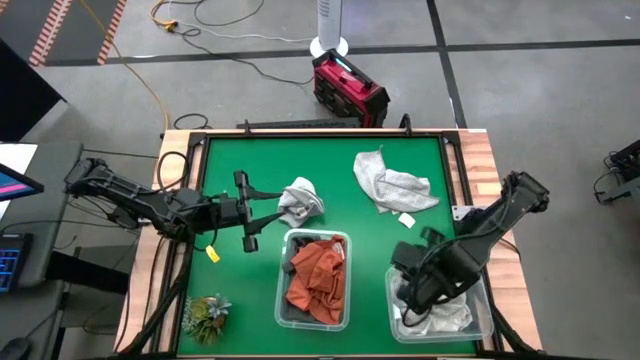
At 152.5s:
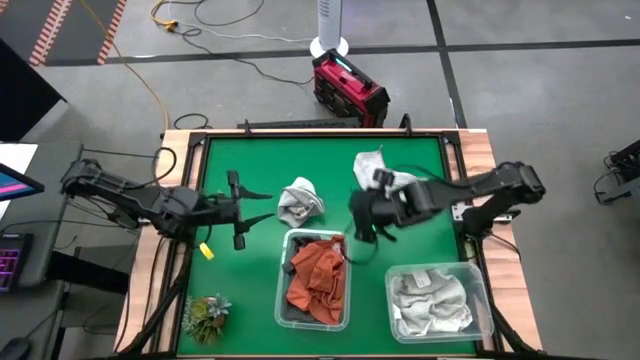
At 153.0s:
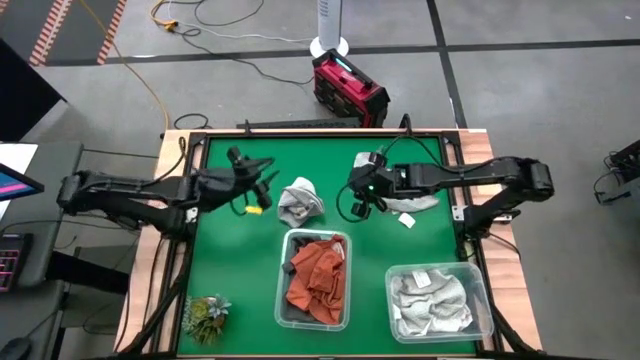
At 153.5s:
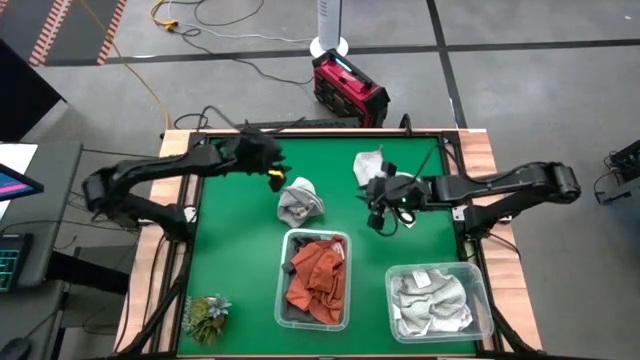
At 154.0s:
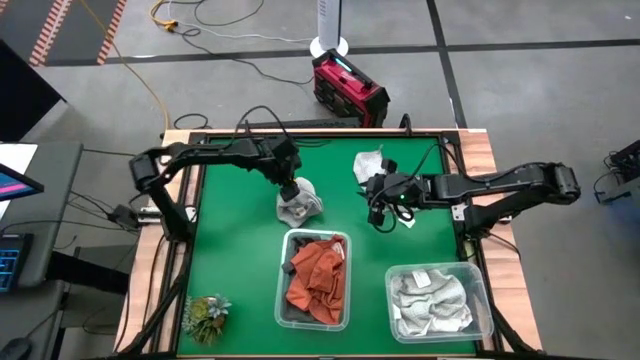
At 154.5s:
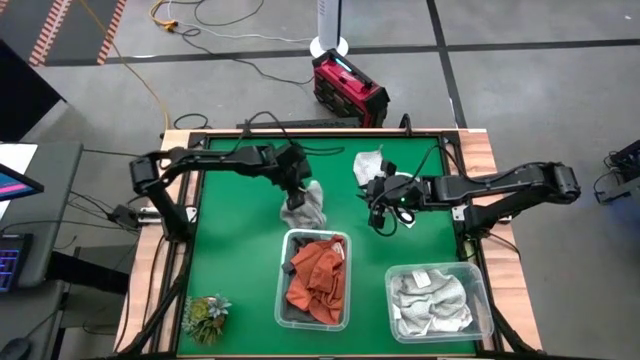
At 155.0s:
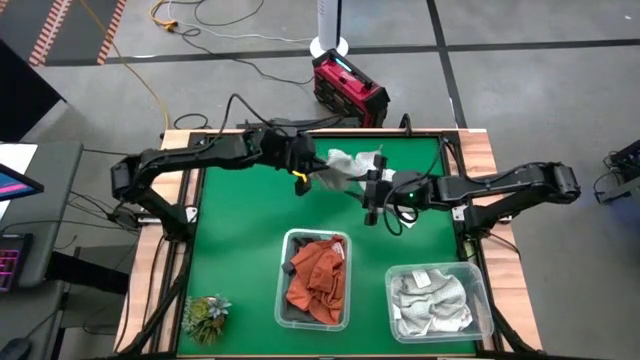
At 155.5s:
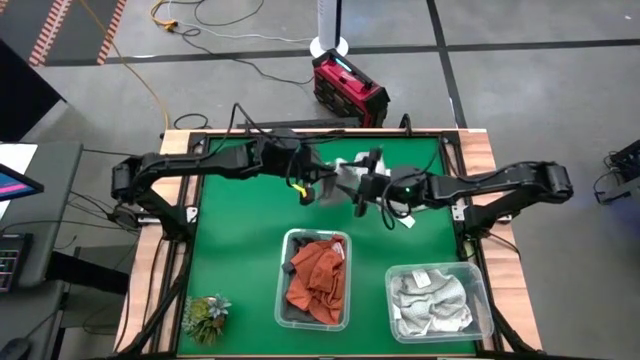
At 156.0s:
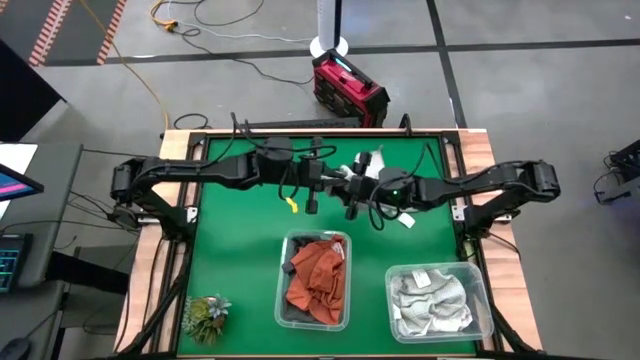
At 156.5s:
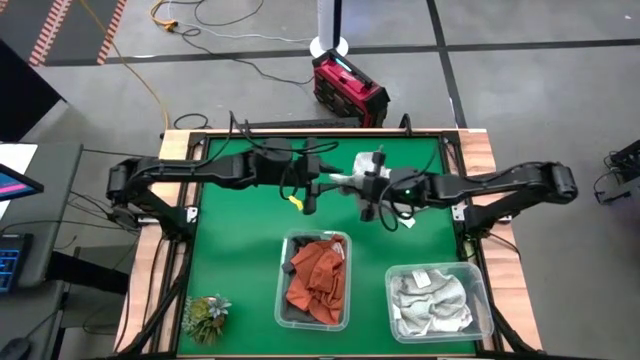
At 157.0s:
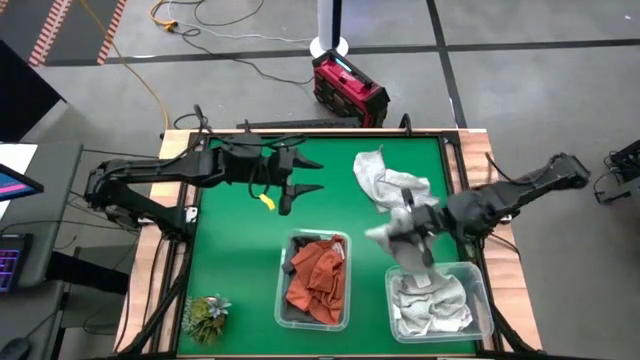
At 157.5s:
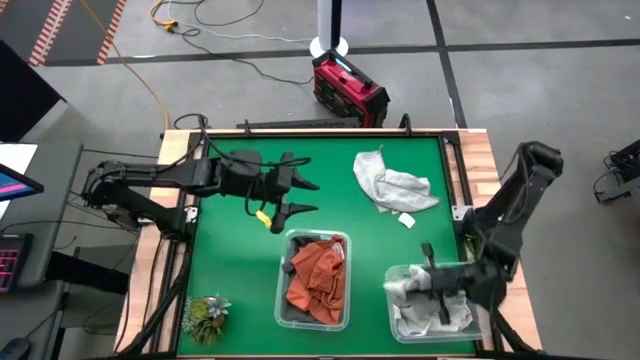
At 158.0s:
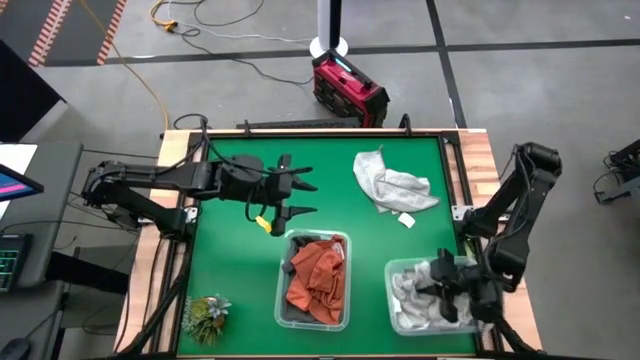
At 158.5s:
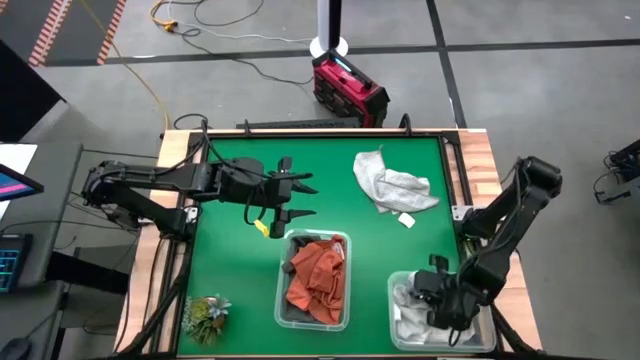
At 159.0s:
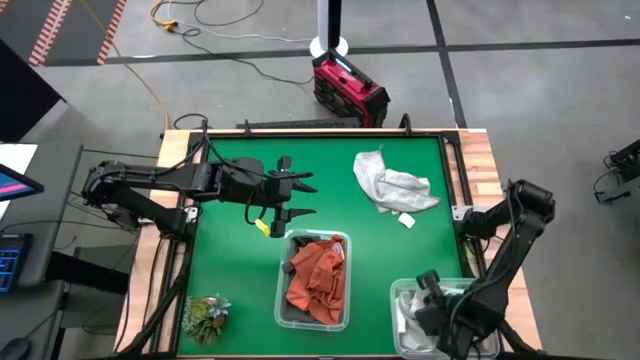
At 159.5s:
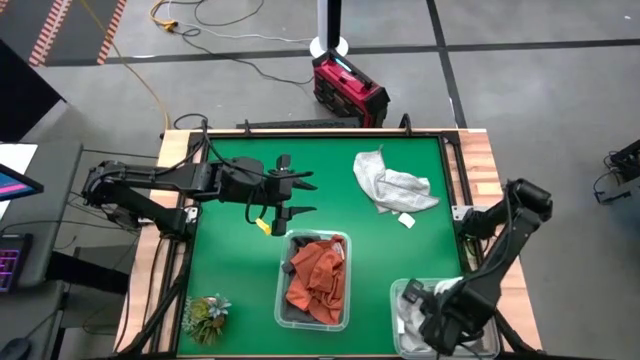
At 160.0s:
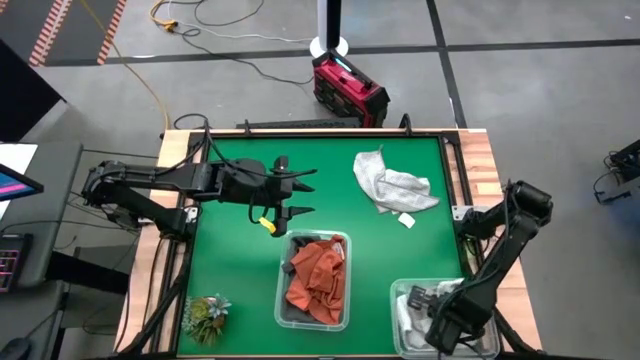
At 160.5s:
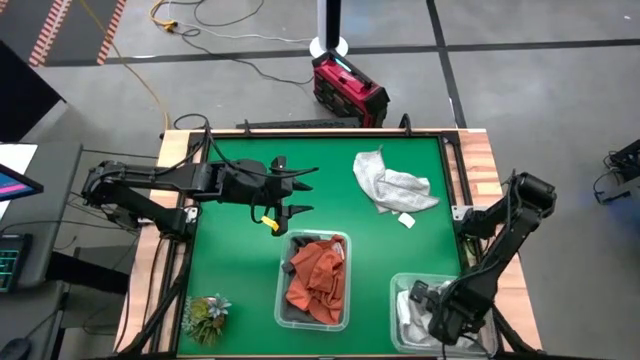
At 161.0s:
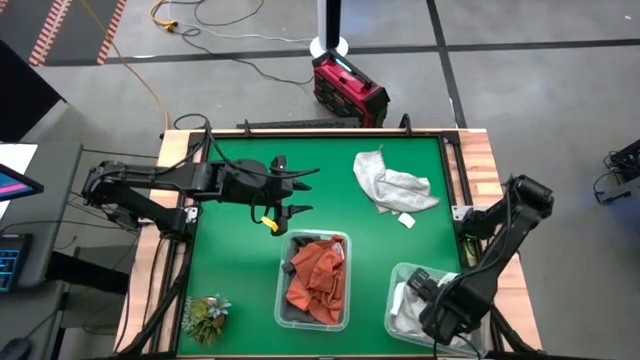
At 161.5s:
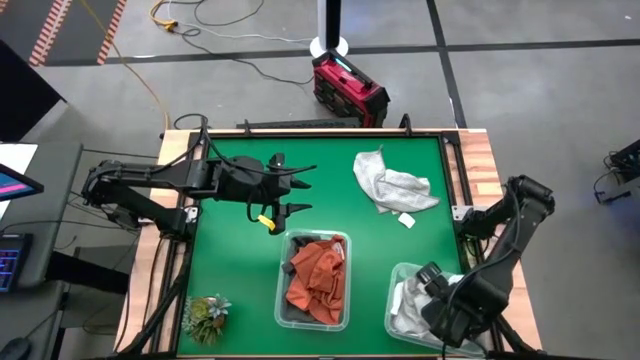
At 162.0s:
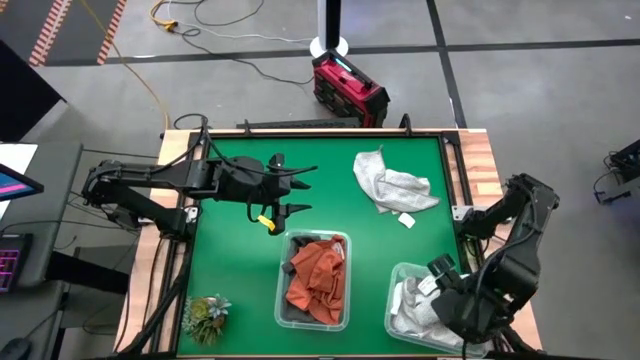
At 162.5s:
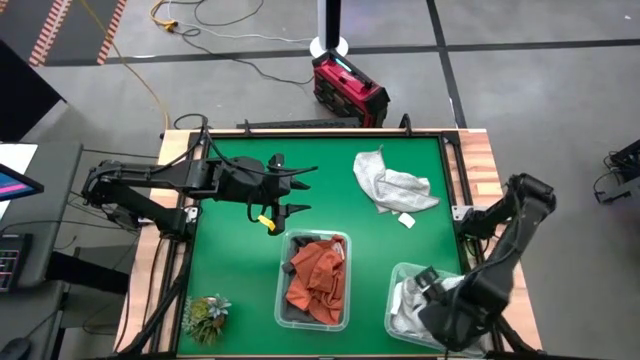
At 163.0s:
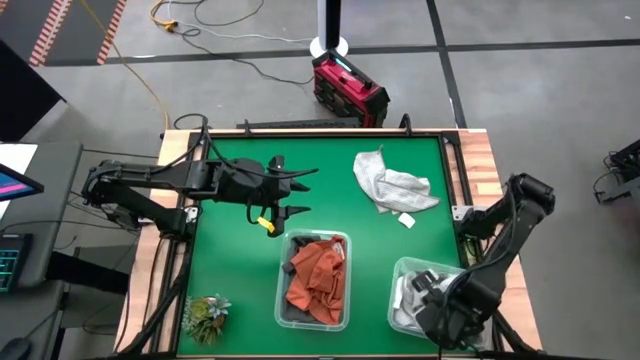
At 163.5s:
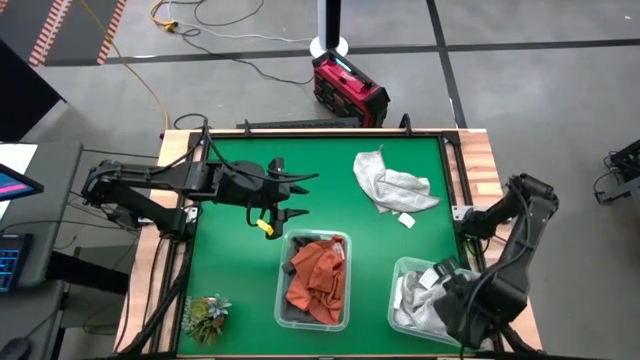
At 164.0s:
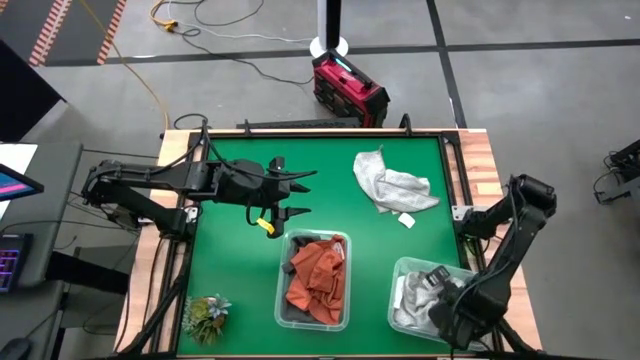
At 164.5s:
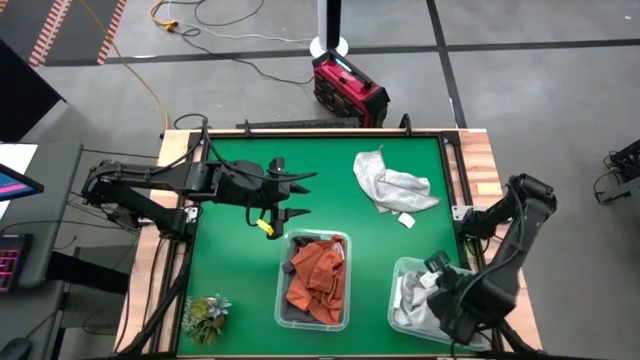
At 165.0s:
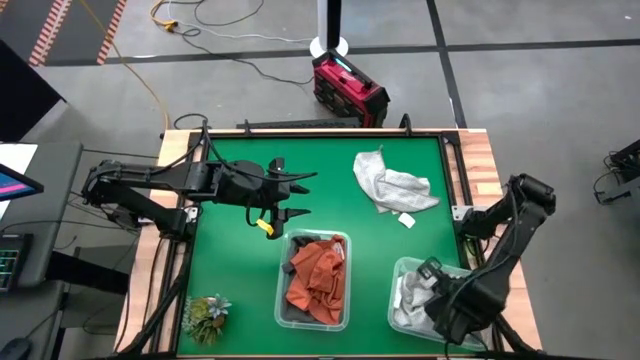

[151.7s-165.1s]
Task: Sort towels by color in basket
Put the left light grey towel into the right transparent bin

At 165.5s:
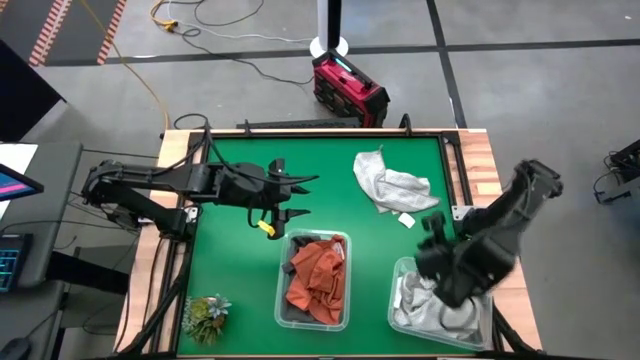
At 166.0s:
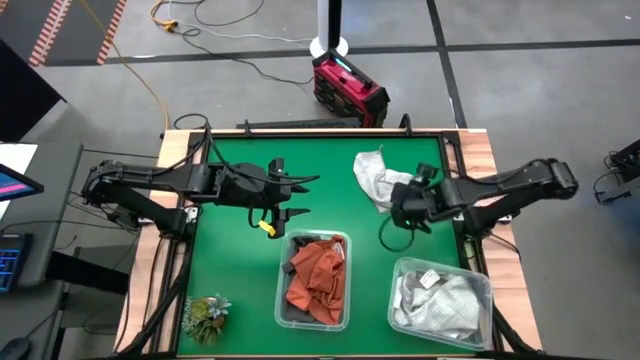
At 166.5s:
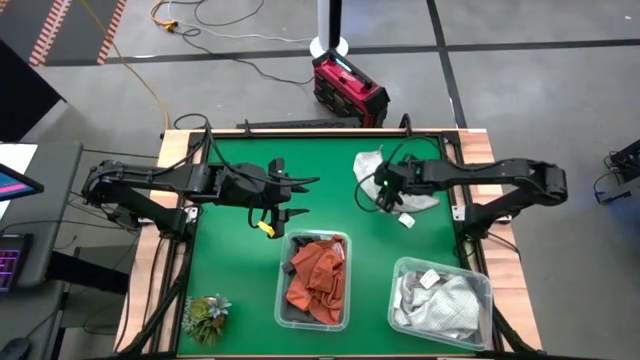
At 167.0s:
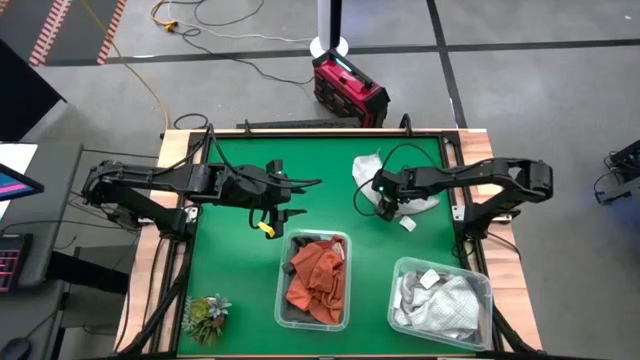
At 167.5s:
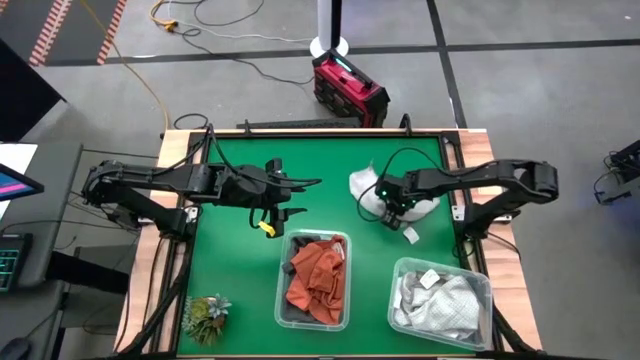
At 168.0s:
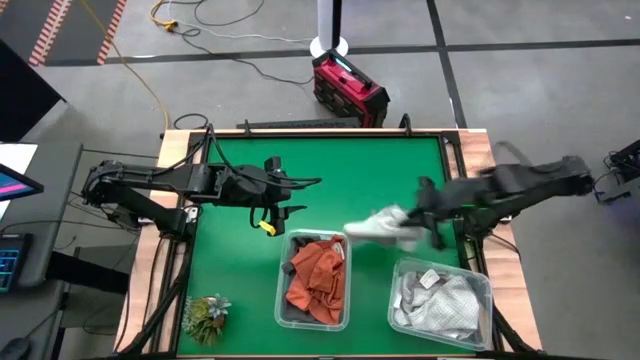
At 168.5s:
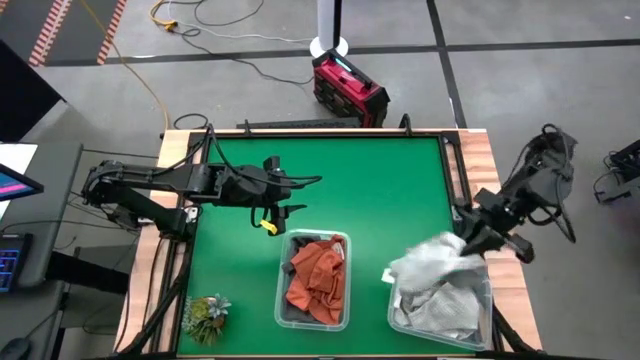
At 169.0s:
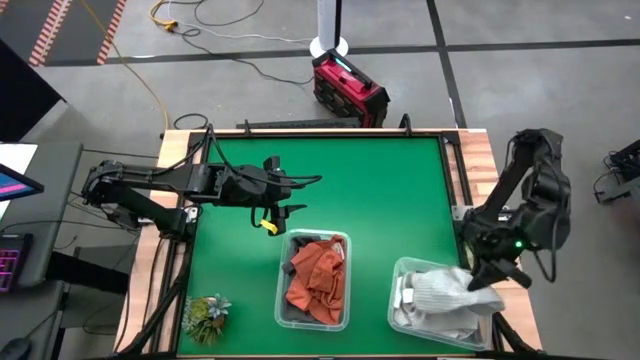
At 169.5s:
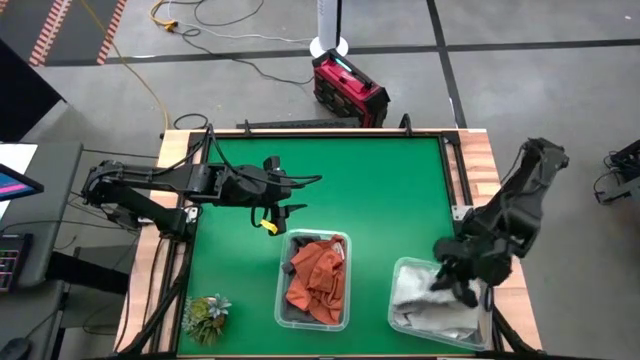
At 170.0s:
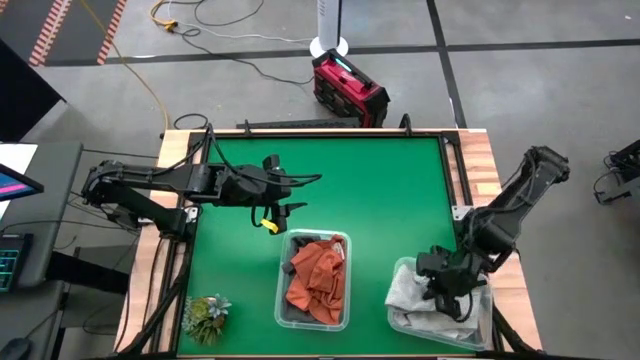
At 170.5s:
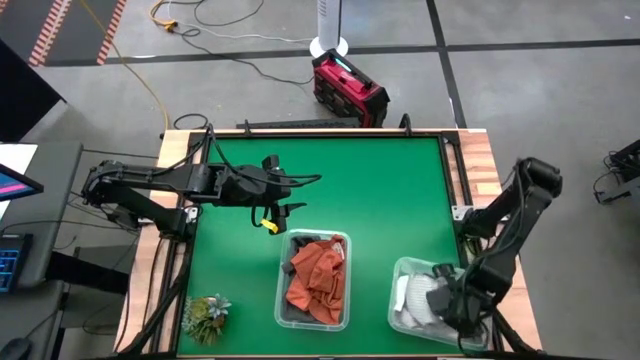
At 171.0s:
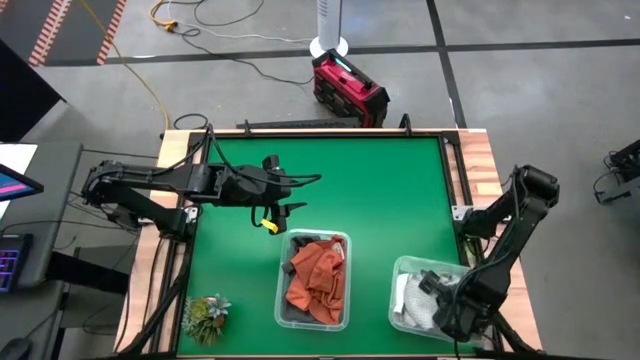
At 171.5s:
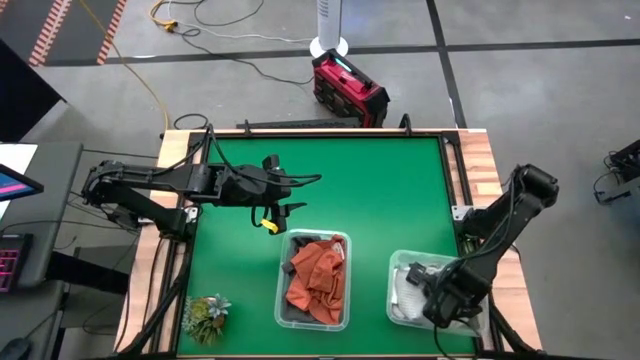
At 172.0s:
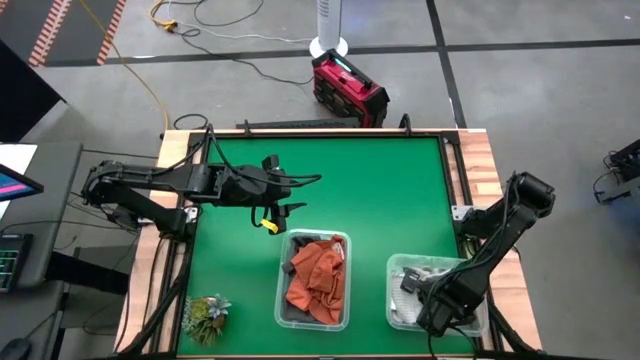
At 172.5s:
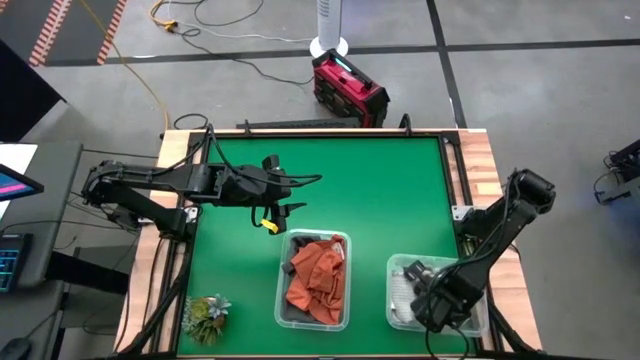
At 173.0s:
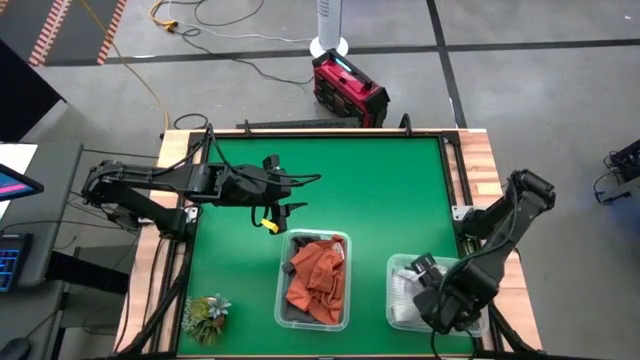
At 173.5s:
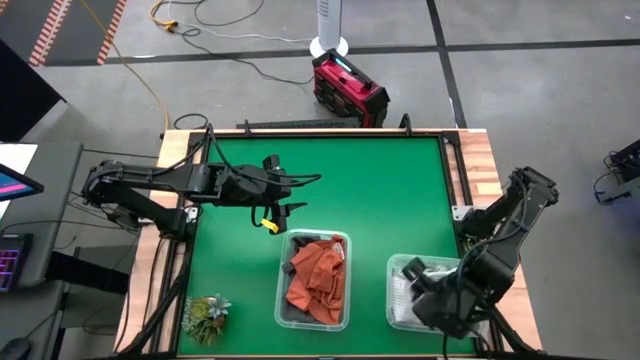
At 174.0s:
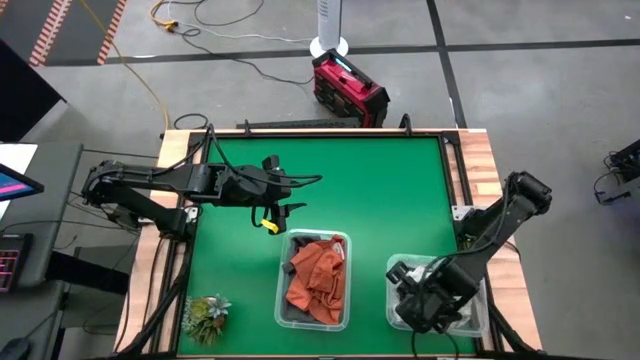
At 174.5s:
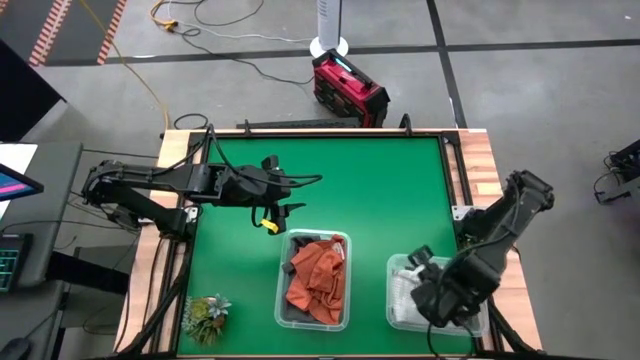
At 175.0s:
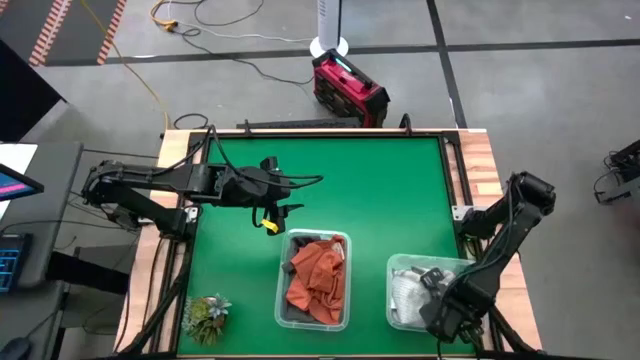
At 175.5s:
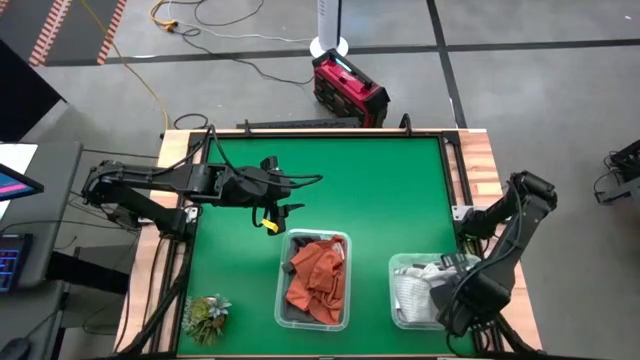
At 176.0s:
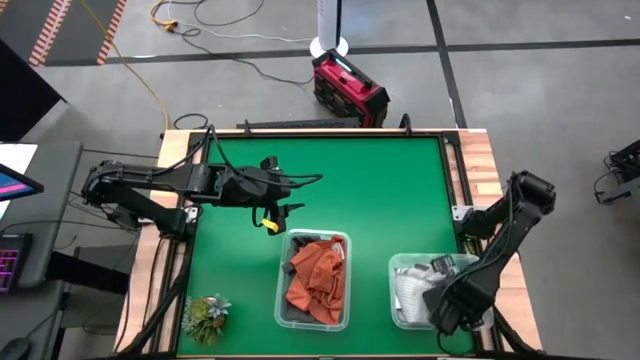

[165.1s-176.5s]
Put the light grey towel into the right transparent bin
